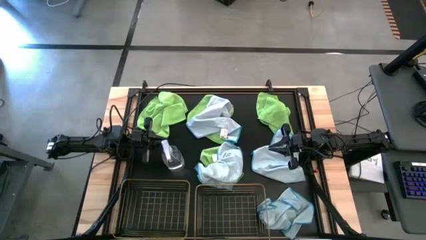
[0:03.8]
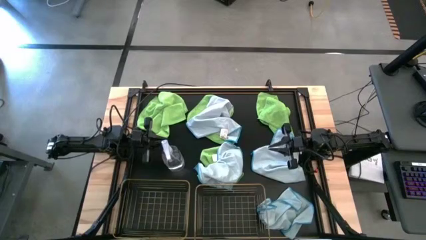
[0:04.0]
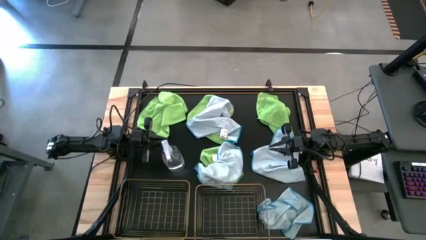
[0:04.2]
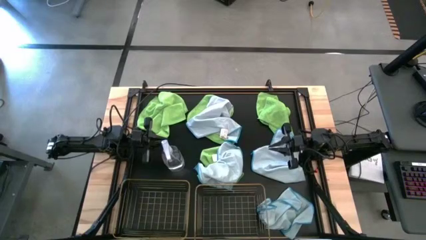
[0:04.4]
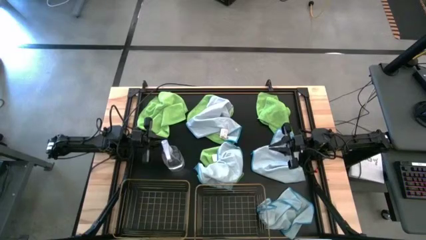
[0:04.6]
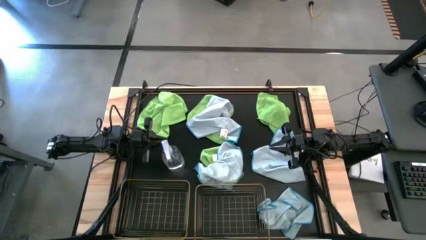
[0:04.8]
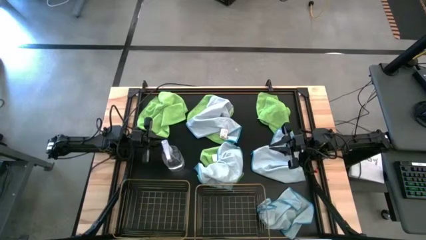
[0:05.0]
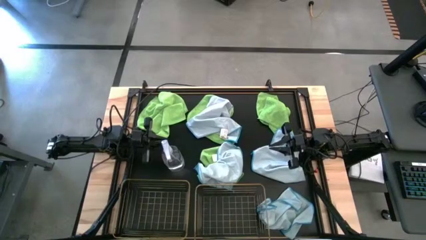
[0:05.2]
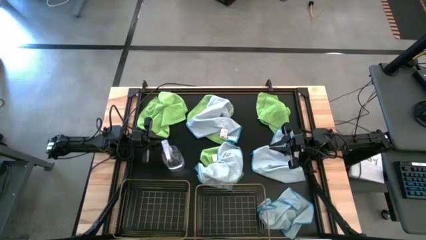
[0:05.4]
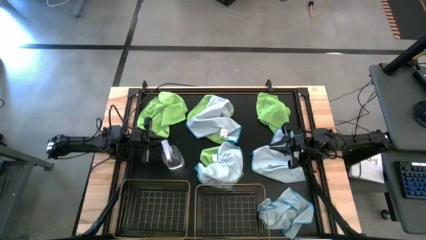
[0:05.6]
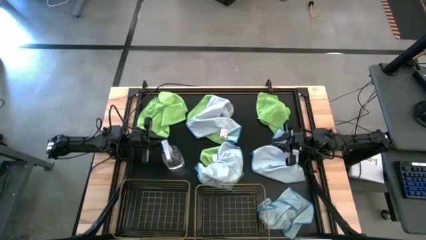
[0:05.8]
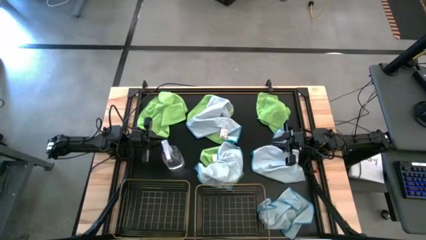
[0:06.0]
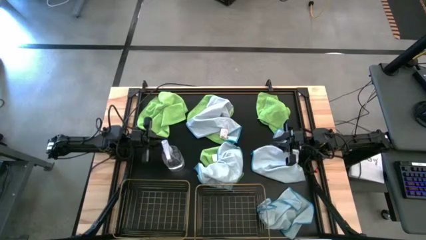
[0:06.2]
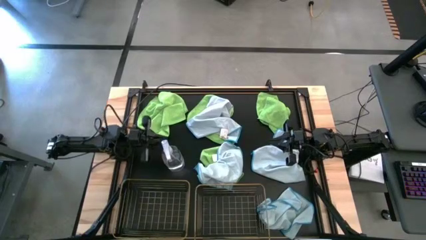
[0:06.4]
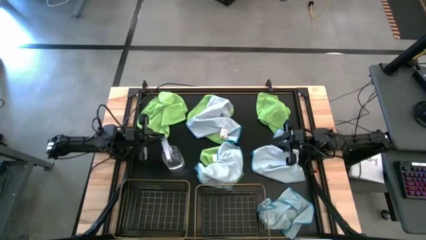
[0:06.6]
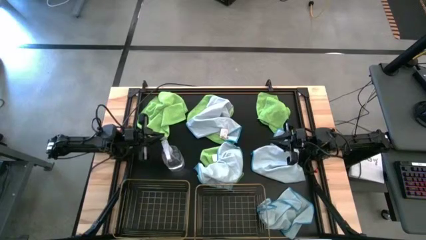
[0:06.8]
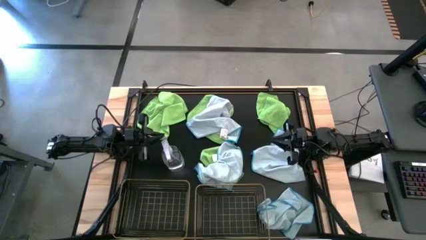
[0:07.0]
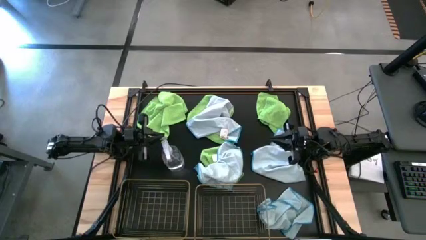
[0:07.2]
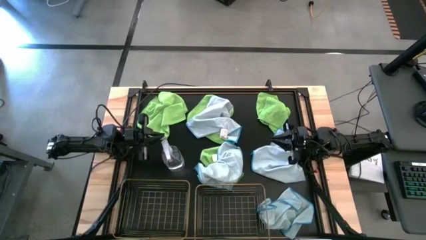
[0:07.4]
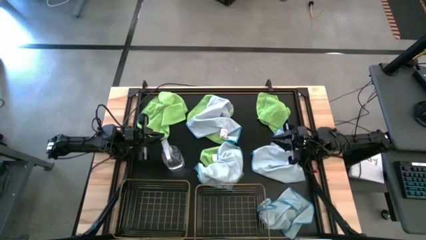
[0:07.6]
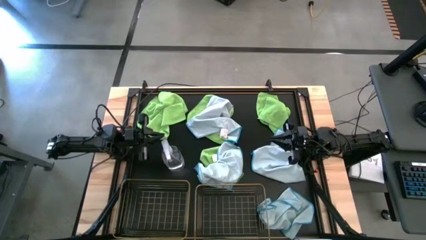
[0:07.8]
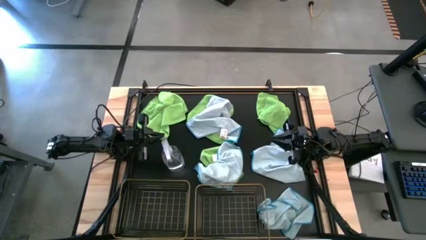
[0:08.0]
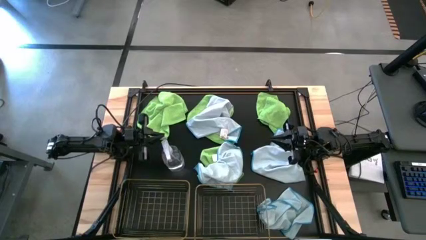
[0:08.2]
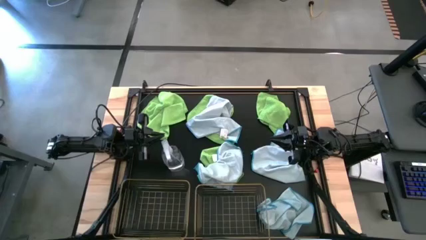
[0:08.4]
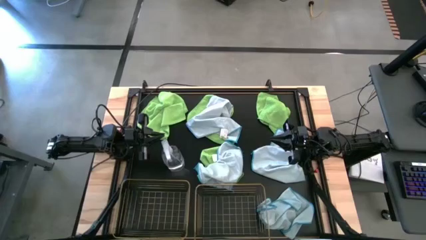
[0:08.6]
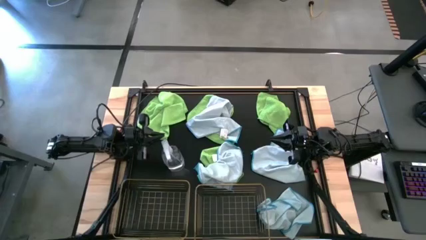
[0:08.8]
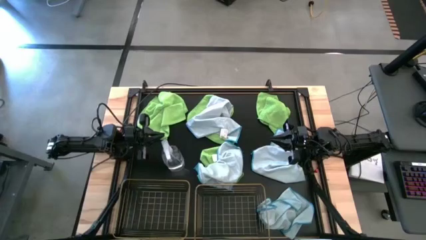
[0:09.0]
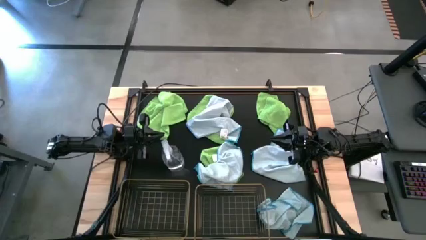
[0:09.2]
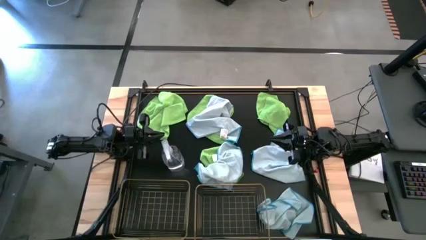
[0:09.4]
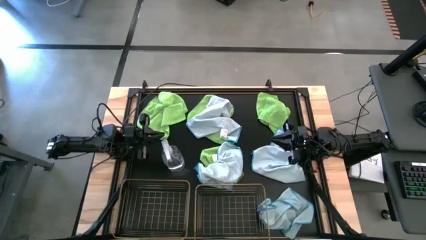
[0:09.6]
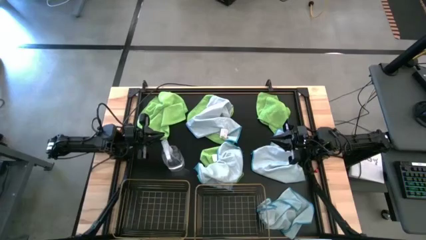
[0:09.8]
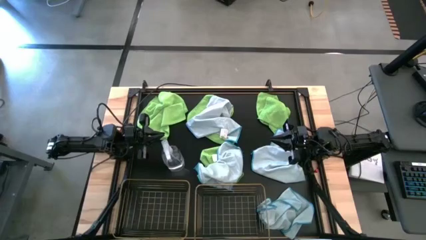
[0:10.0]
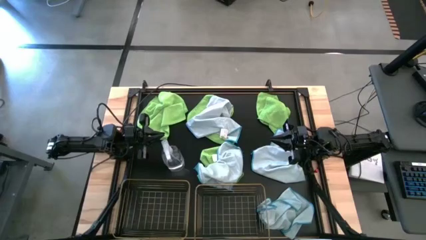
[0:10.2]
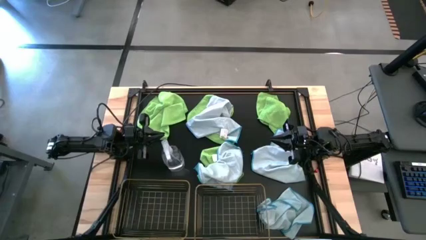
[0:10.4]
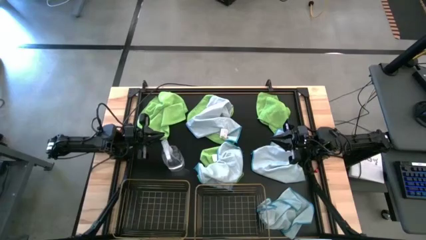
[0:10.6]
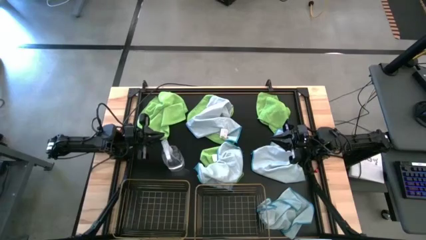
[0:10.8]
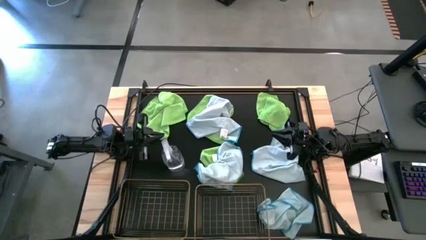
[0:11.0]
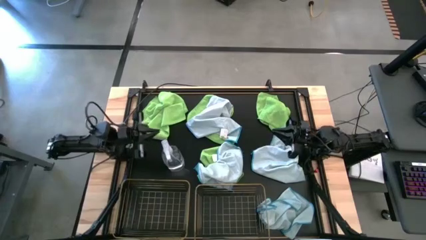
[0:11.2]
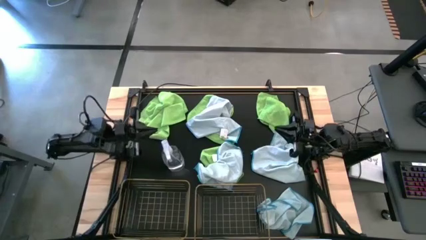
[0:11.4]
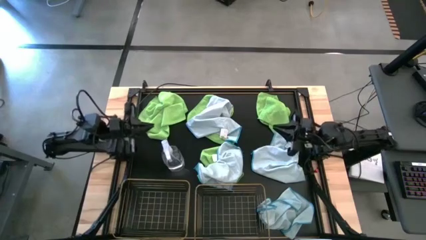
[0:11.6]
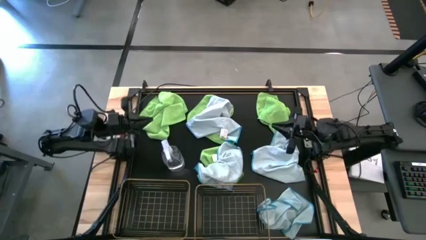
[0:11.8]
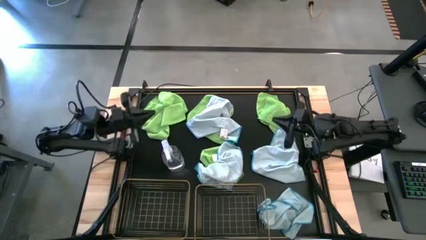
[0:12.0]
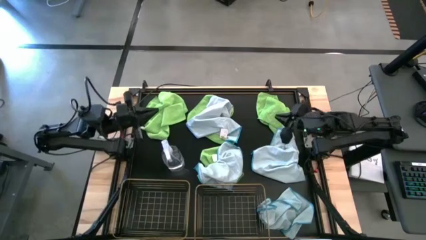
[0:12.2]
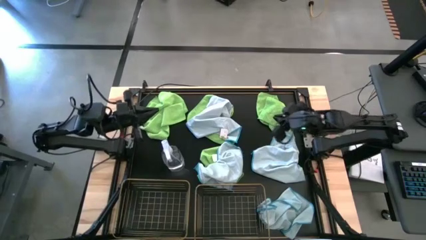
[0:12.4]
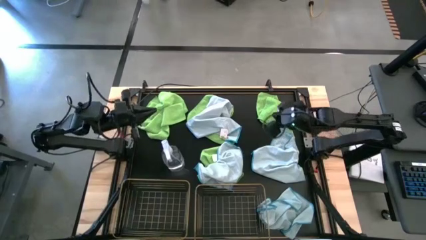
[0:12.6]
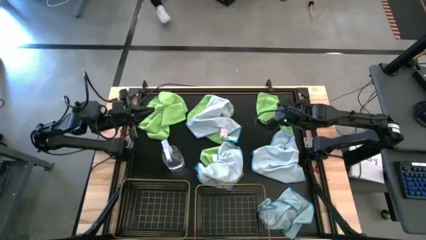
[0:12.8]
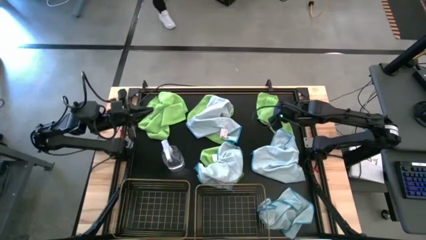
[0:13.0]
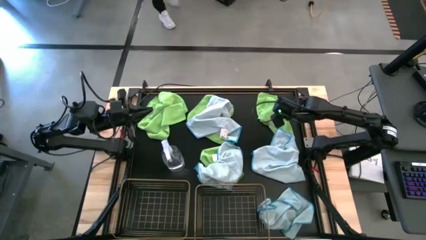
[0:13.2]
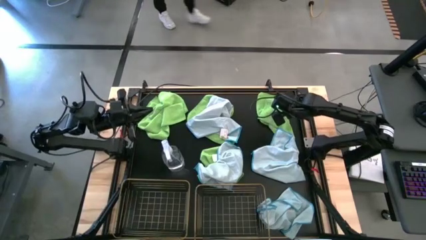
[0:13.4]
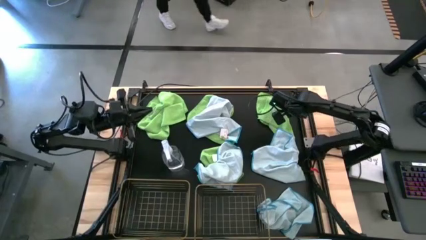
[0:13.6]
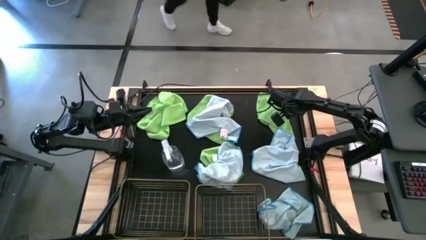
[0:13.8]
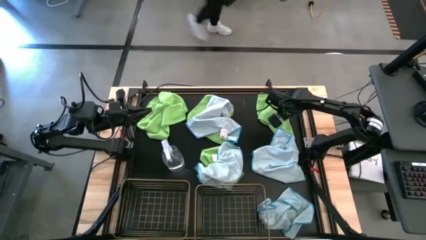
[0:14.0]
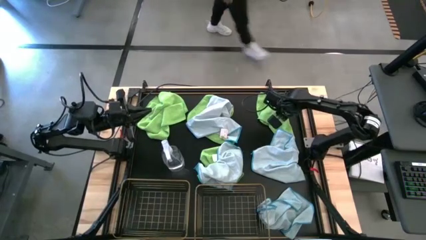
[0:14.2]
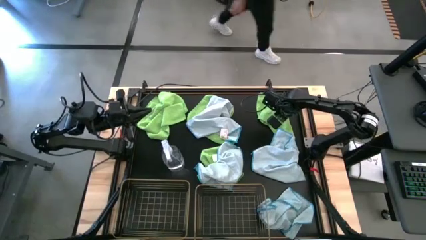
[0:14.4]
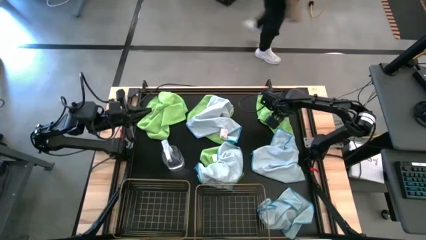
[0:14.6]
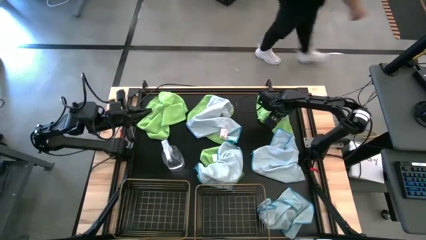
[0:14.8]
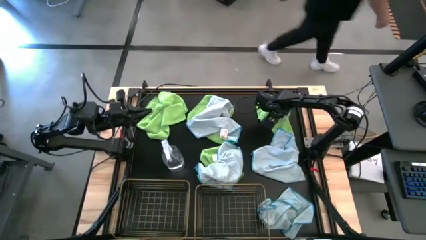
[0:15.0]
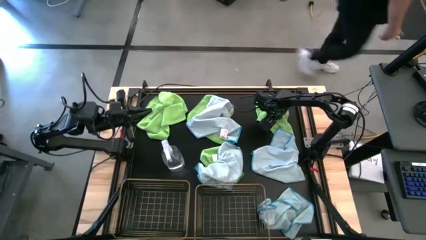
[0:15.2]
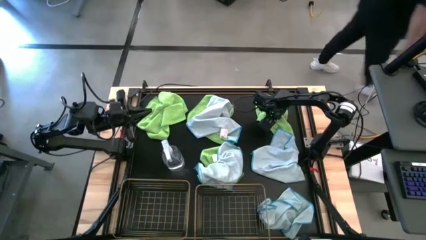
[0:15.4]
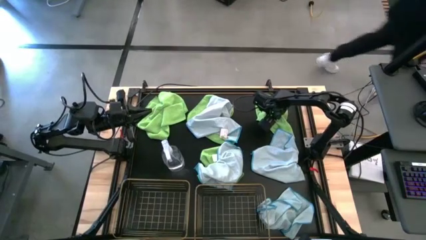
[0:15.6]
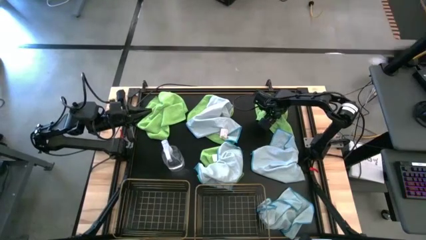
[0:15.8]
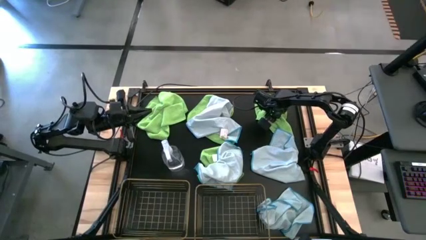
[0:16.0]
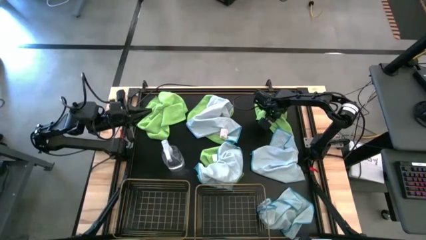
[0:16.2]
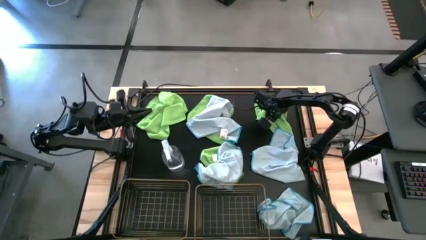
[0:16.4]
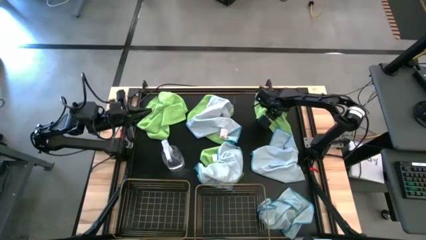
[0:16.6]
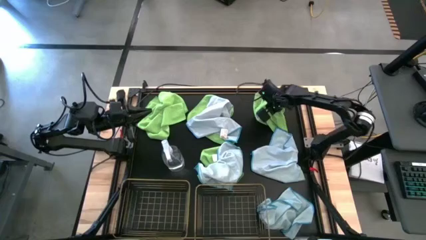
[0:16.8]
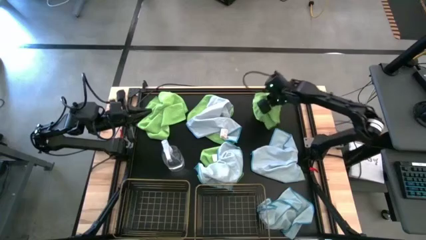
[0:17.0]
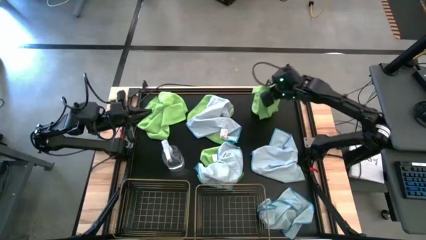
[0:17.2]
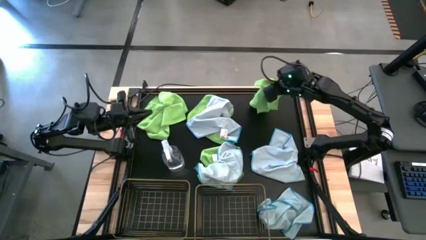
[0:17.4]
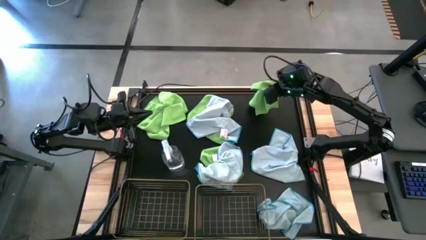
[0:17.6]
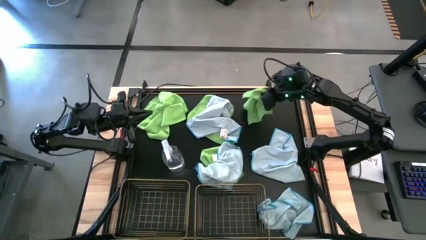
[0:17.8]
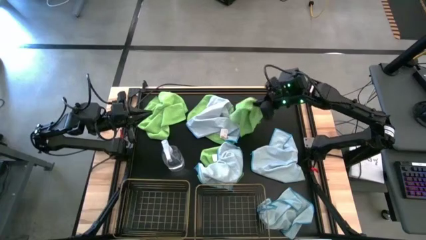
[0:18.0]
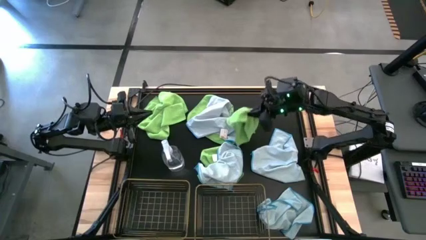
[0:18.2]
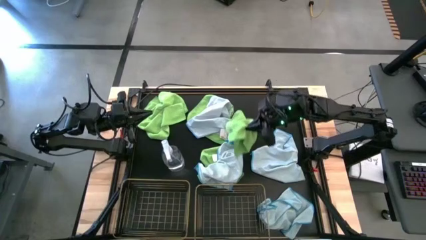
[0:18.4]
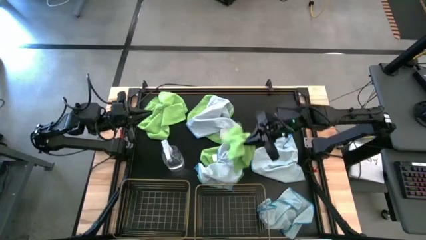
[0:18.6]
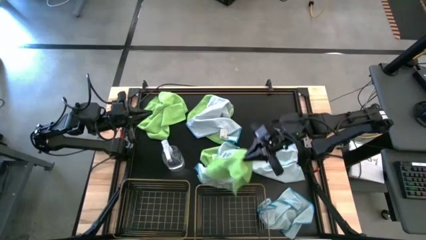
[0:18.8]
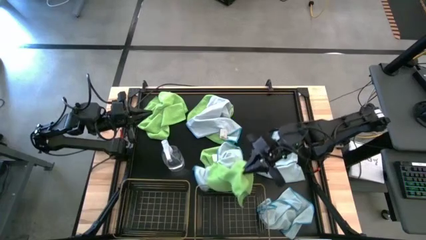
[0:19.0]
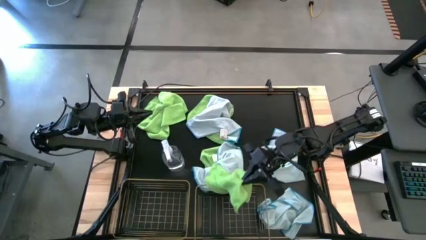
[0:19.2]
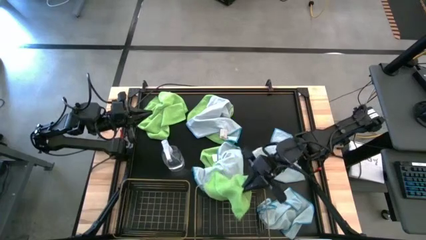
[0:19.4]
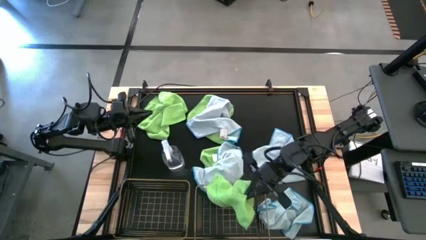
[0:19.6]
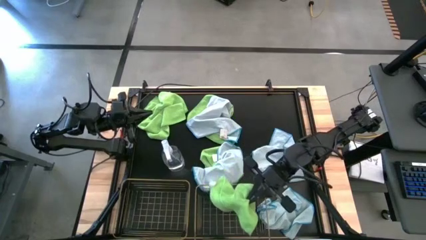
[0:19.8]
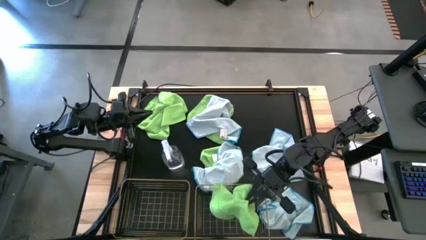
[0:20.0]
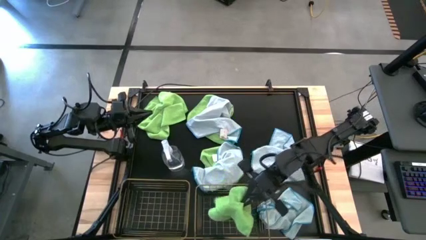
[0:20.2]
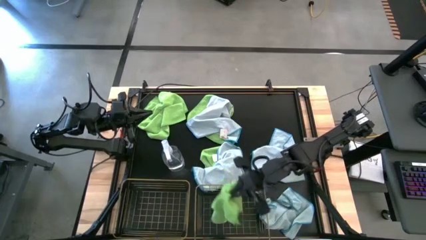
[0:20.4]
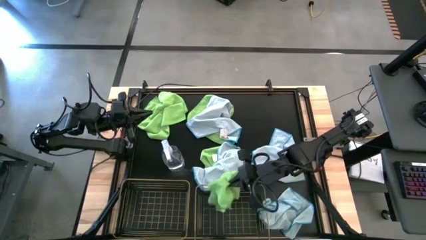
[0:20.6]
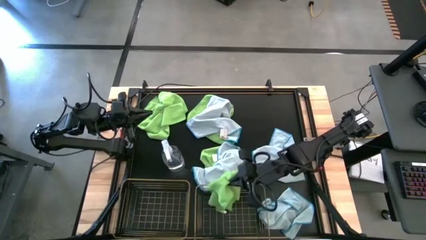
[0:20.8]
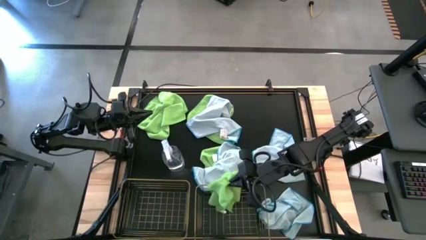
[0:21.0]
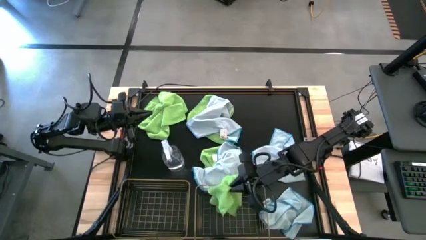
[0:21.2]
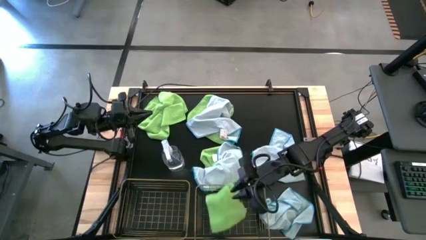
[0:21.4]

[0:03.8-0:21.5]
Task: Sort microfiber towel by color & place in baskets
Put the green microfiber cloth into the right wire basket
